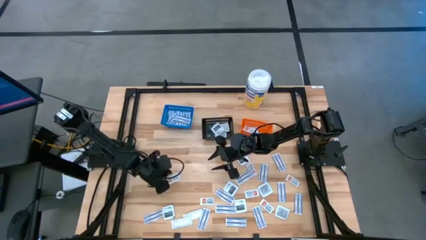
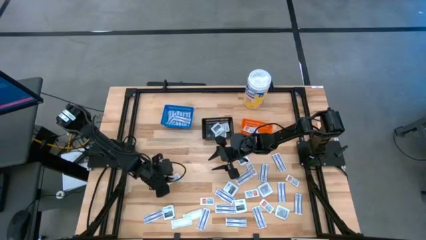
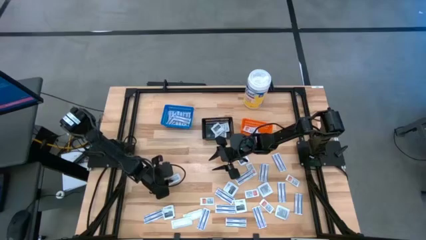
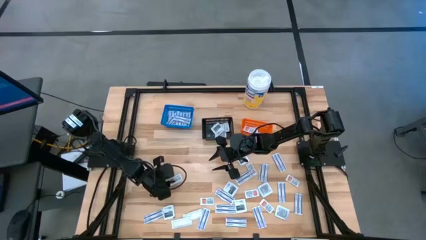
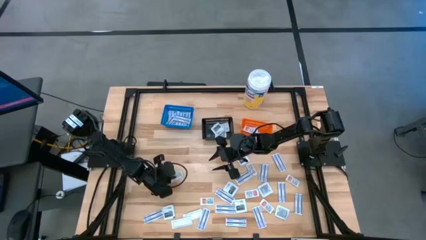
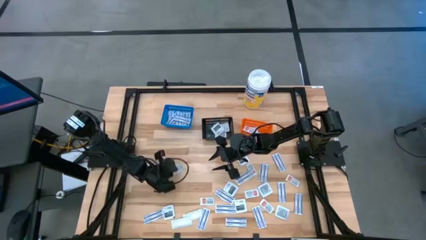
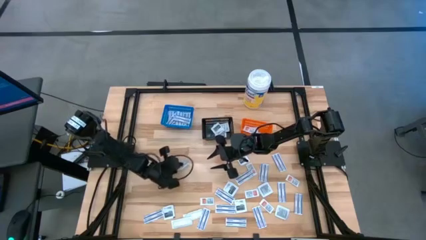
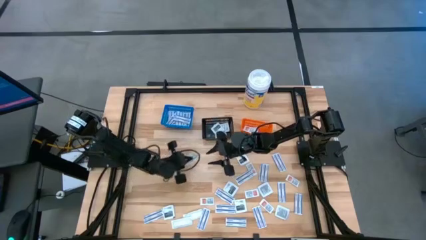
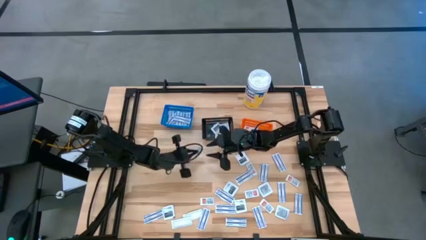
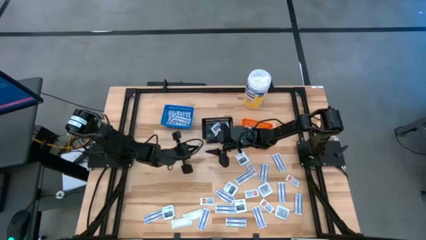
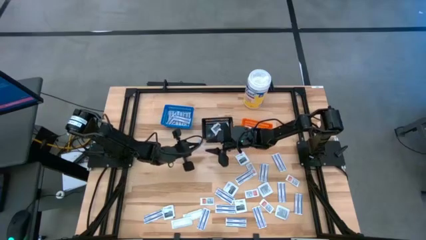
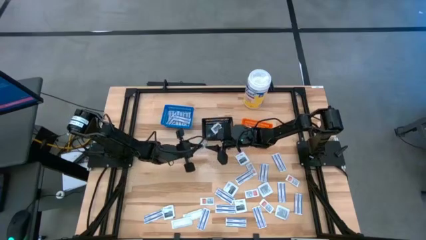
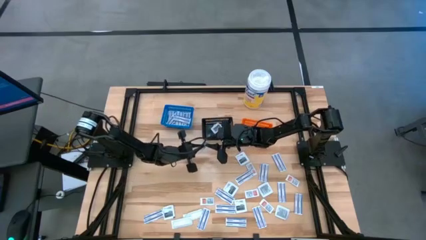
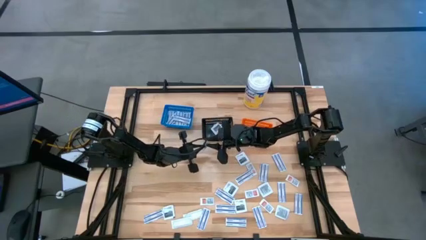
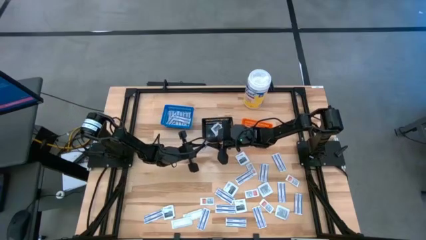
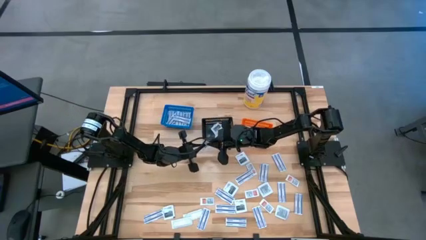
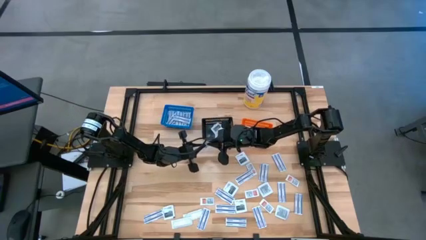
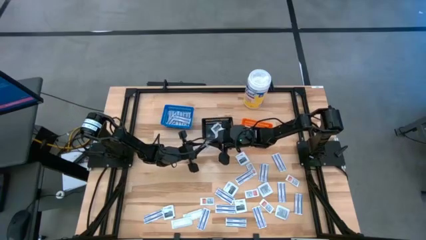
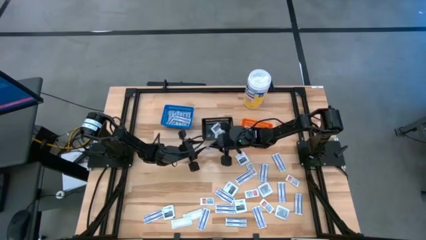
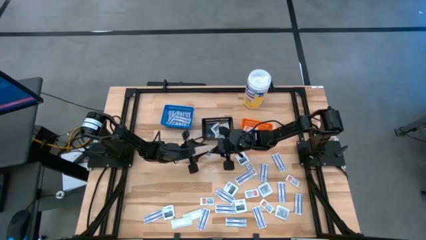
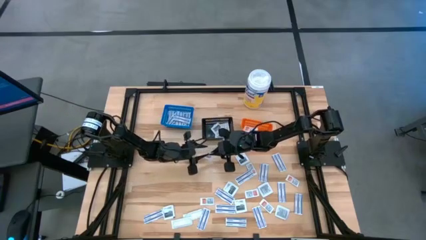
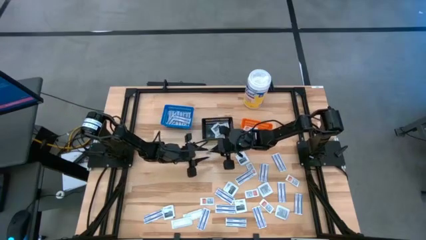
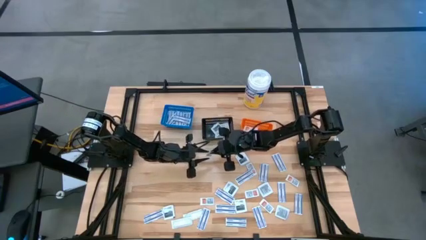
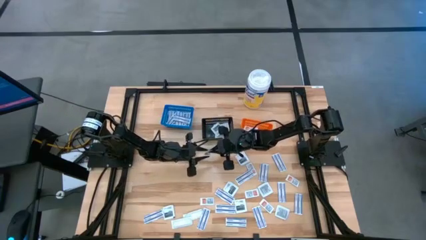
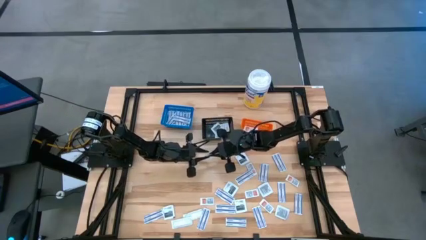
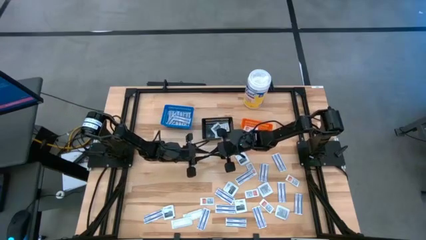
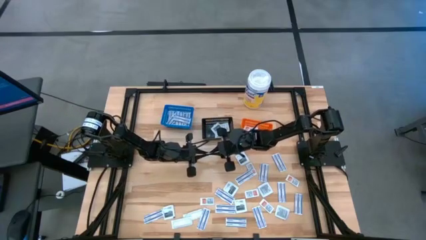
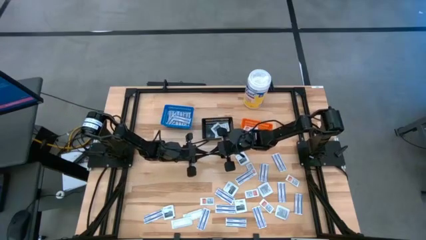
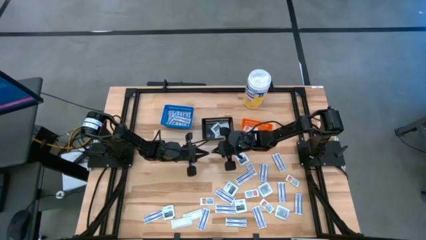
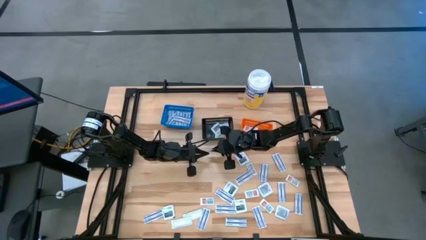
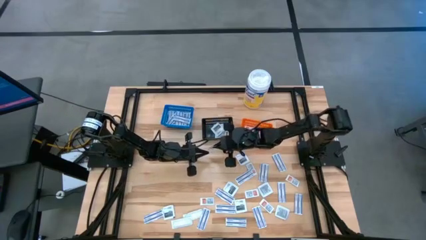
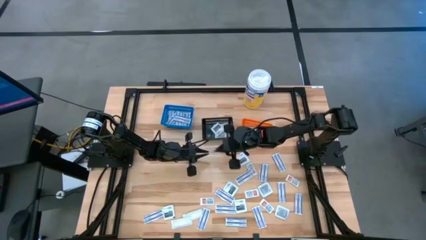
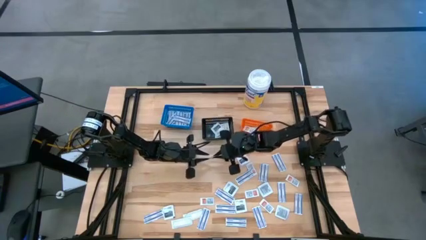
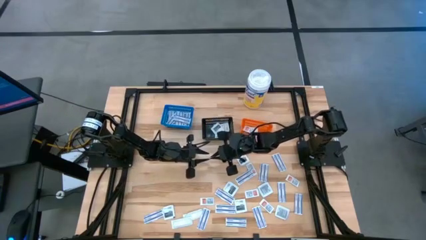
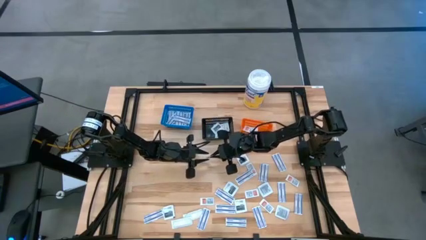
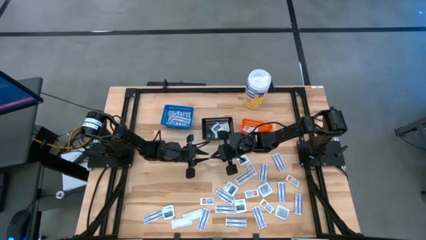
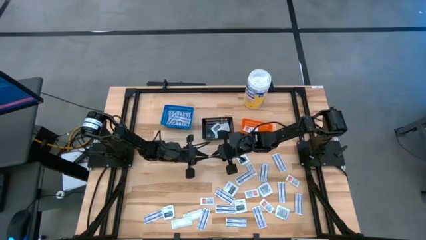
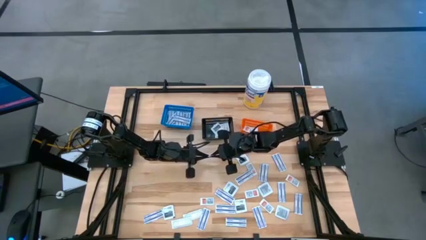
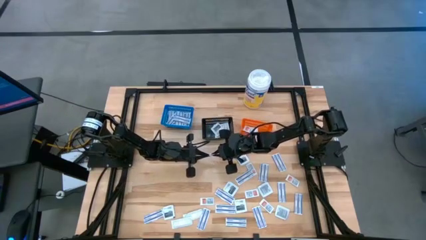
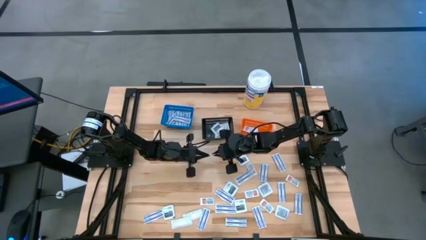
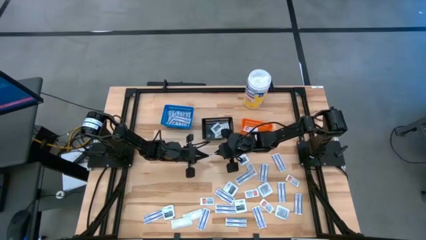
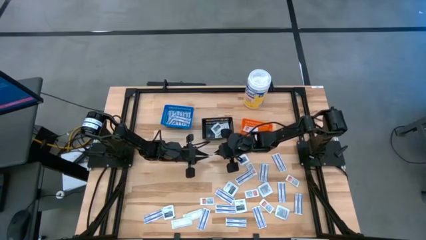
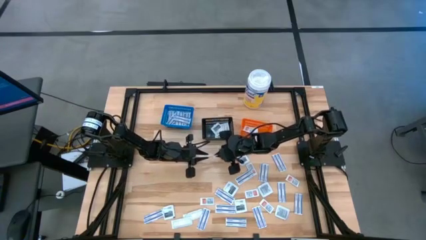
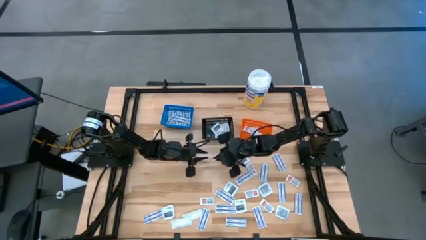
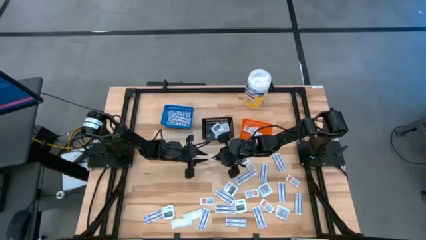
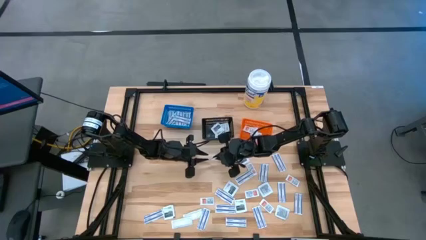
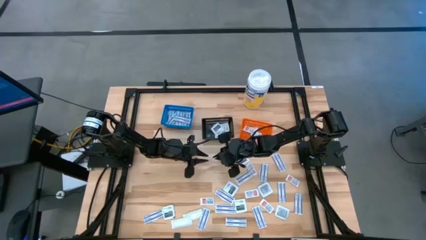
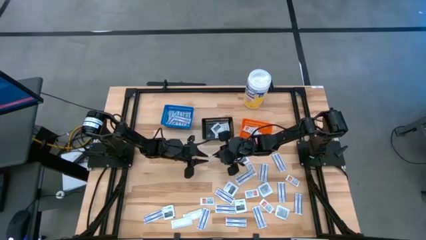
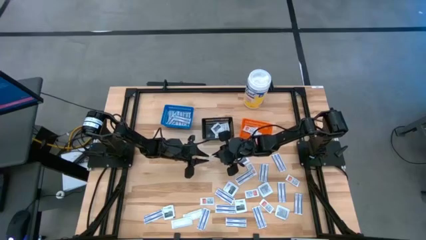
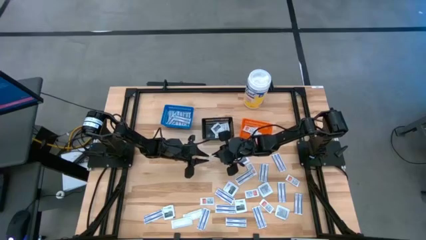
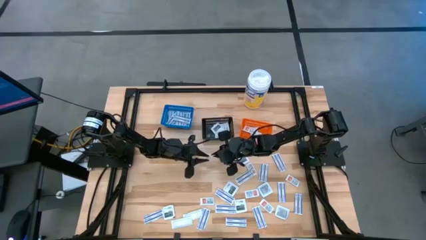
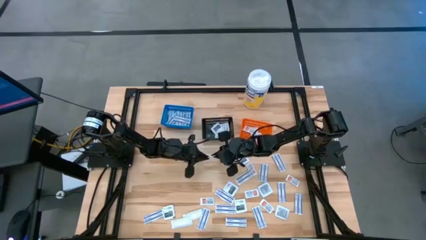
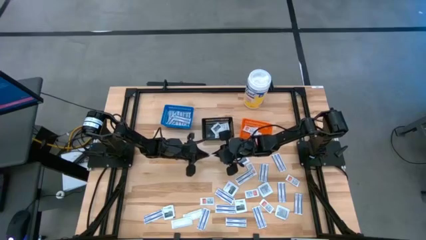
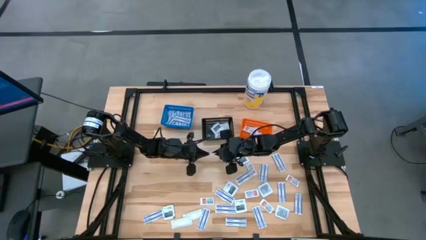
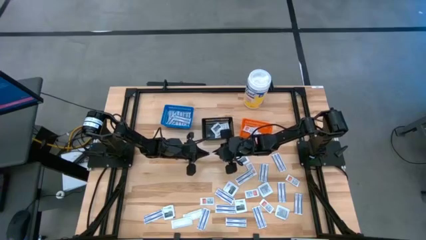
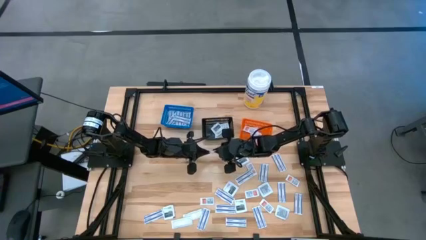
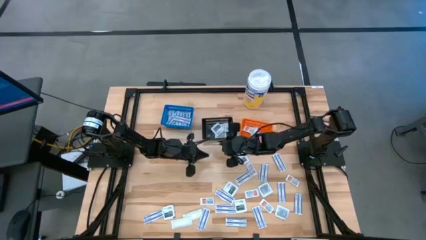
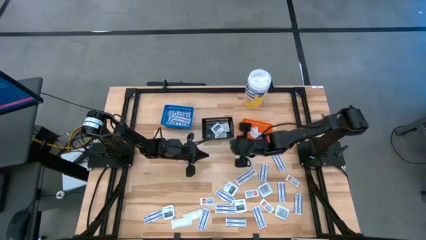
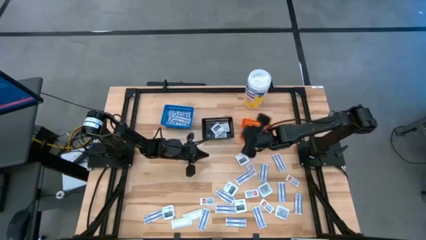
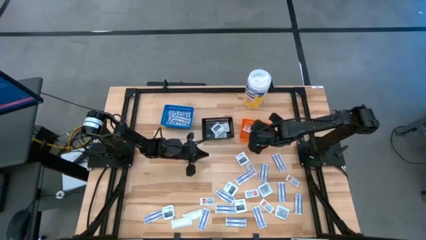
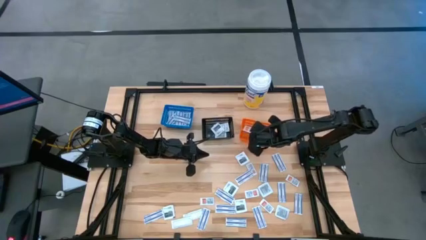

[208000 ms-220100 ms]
Task: Pick & Place First Aid Supplies
Put the ointment pack into the orange bin

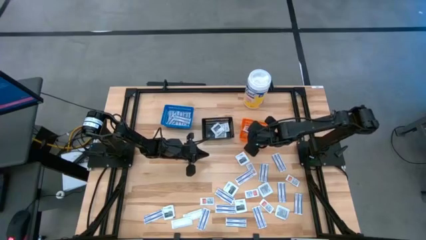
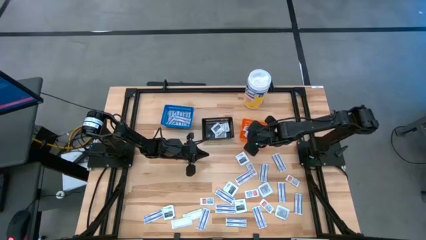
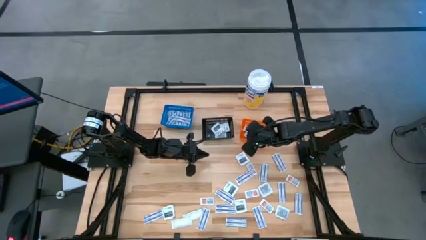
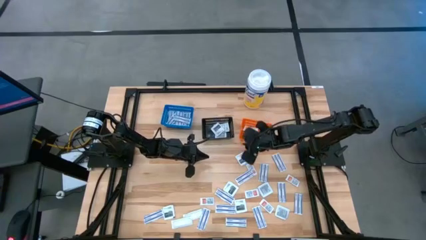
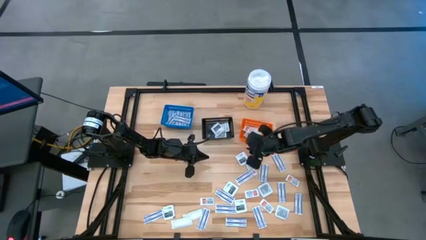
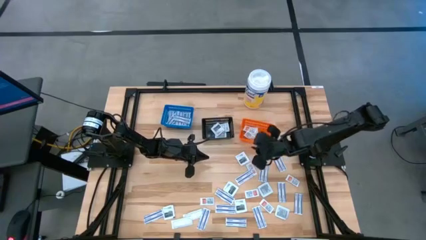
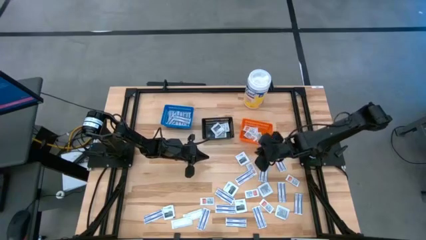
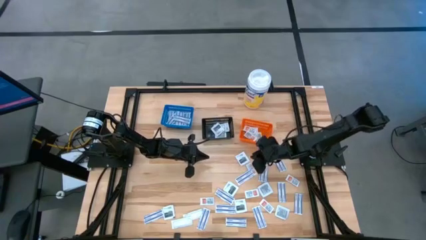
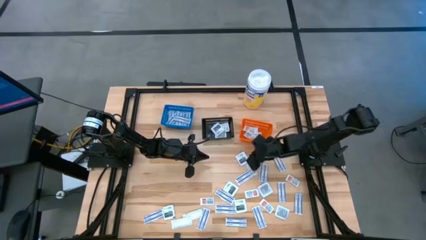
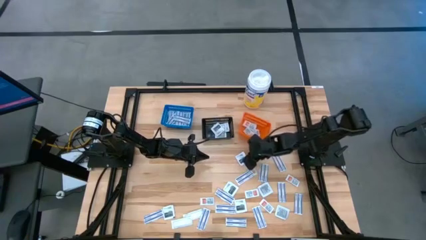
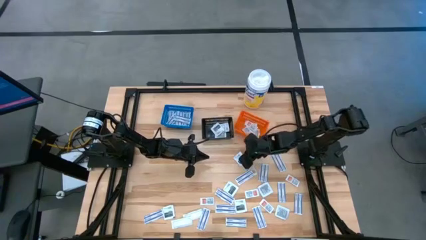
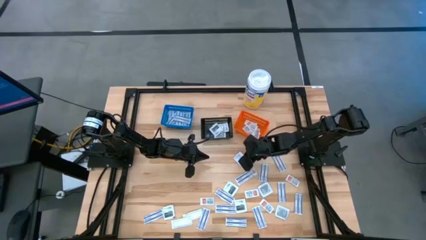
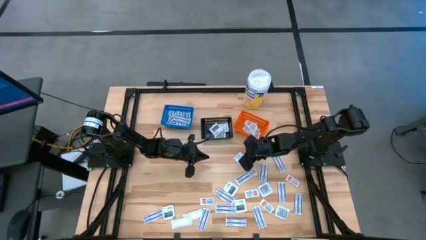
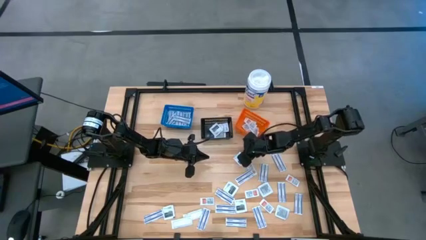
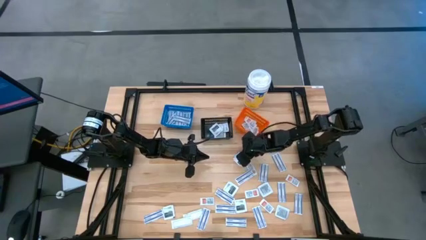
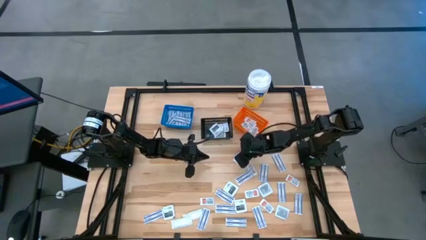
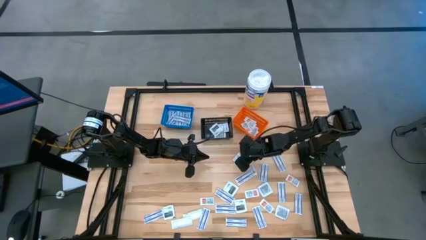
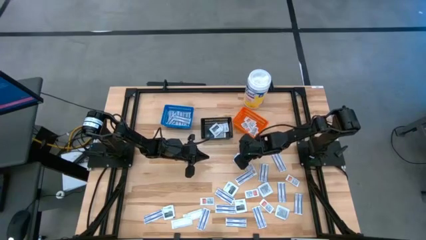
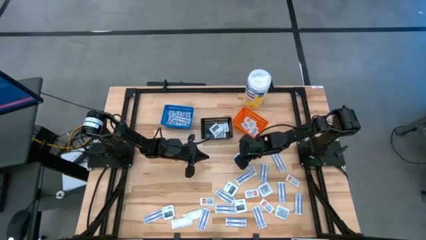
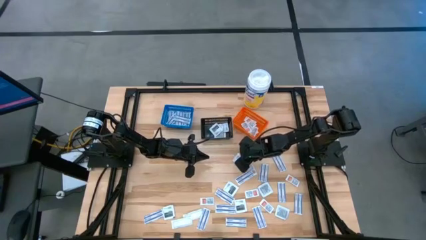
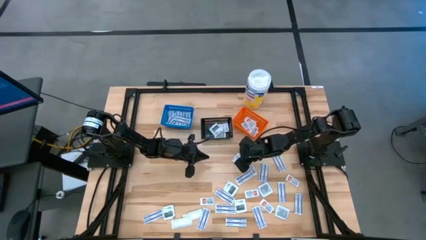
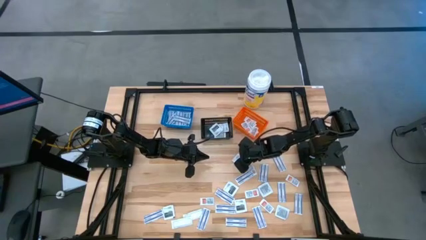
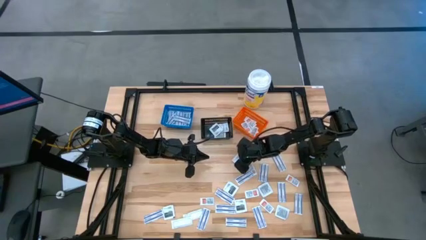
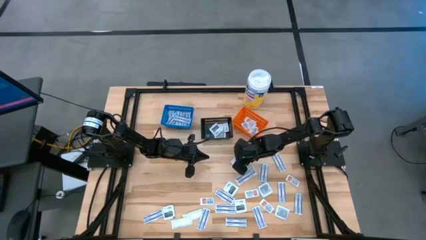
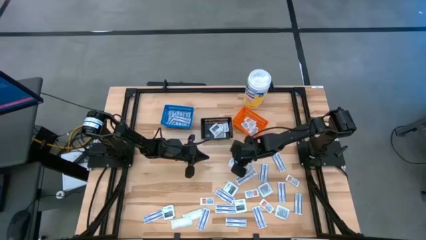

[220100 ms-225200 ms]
Put the towelette pack into the black bin
